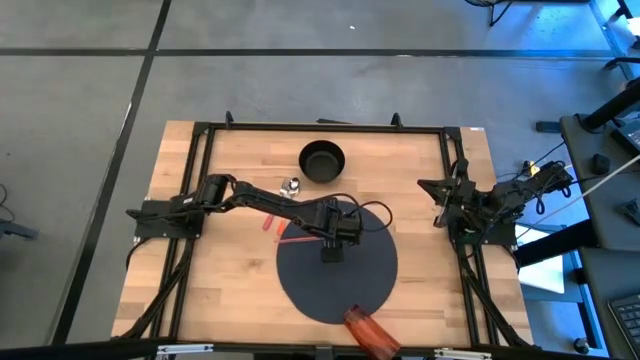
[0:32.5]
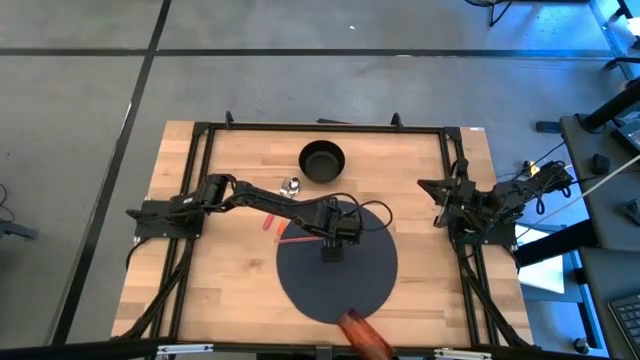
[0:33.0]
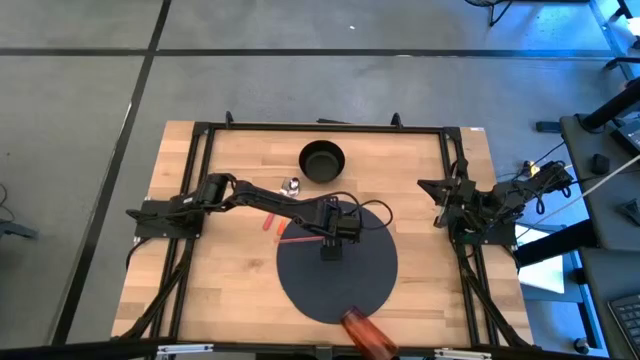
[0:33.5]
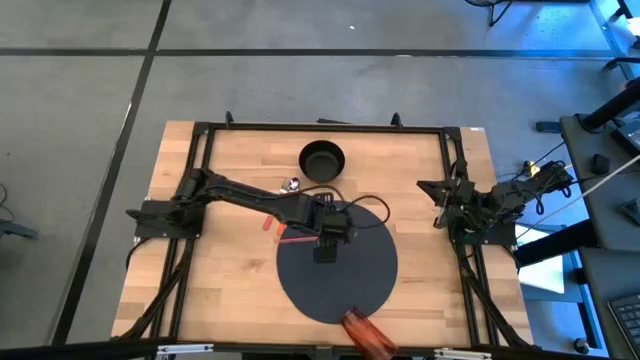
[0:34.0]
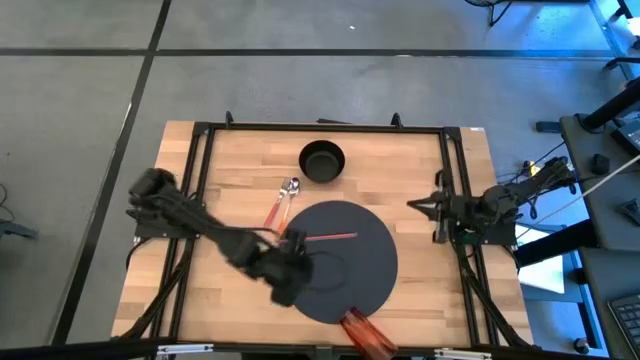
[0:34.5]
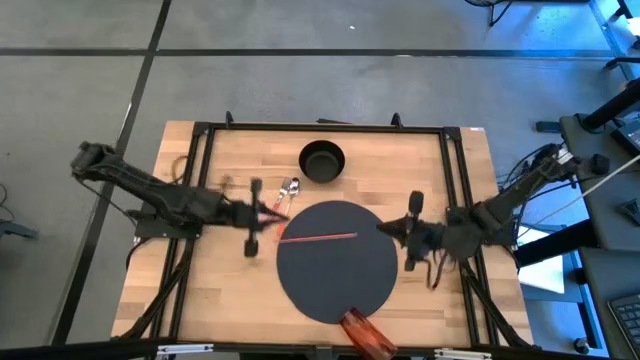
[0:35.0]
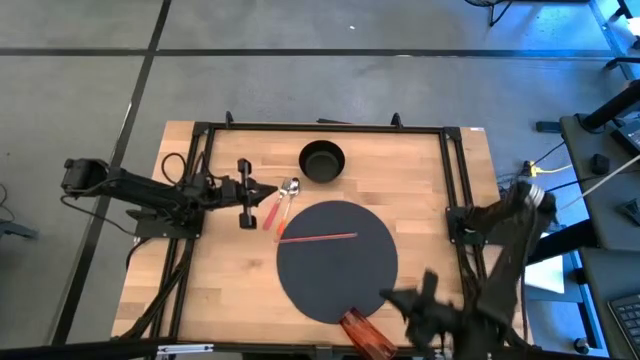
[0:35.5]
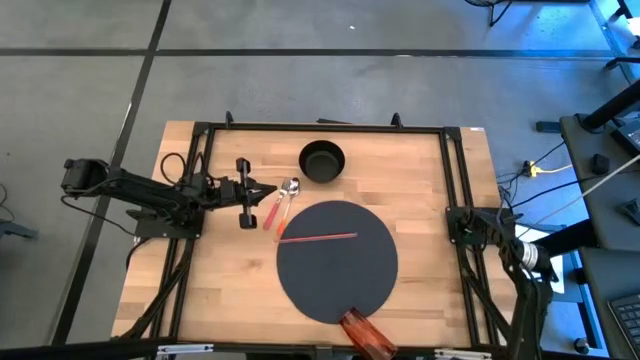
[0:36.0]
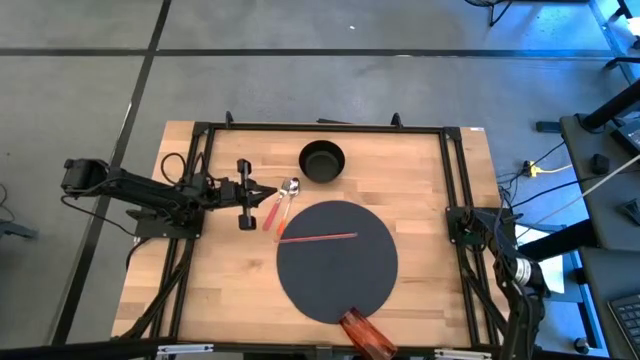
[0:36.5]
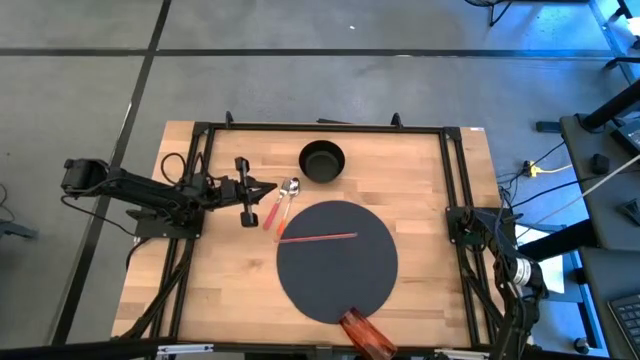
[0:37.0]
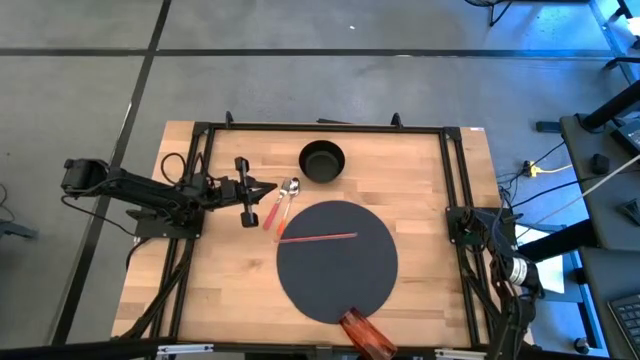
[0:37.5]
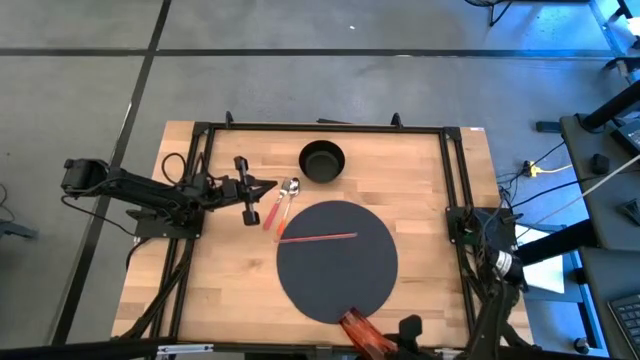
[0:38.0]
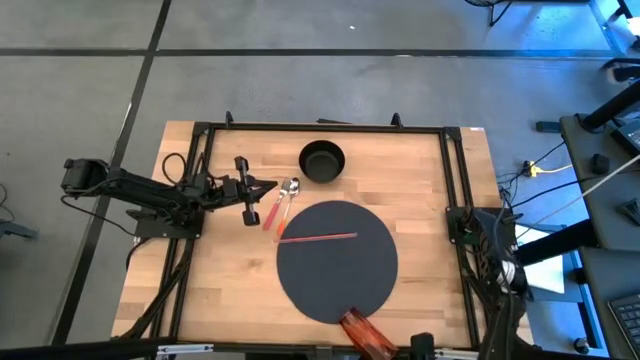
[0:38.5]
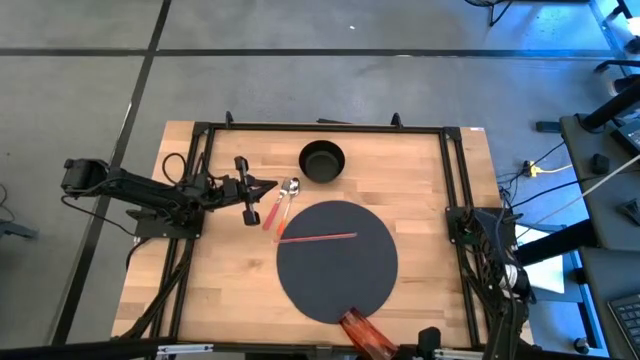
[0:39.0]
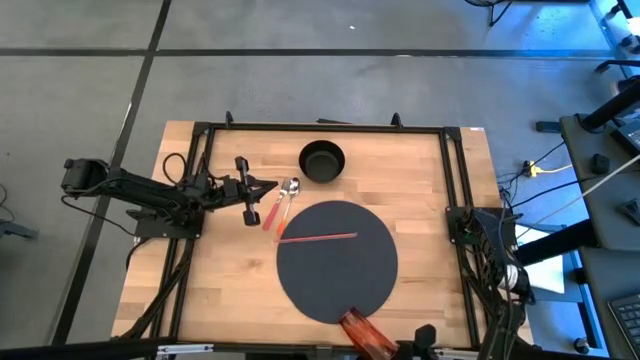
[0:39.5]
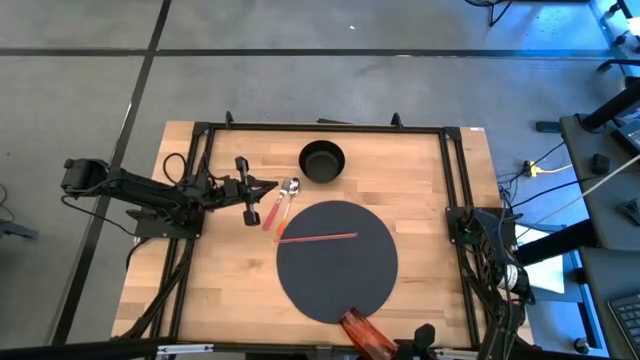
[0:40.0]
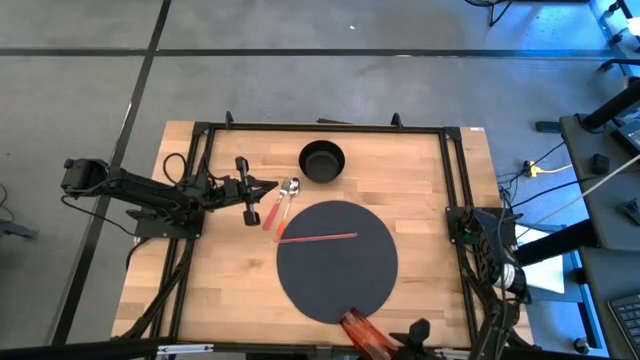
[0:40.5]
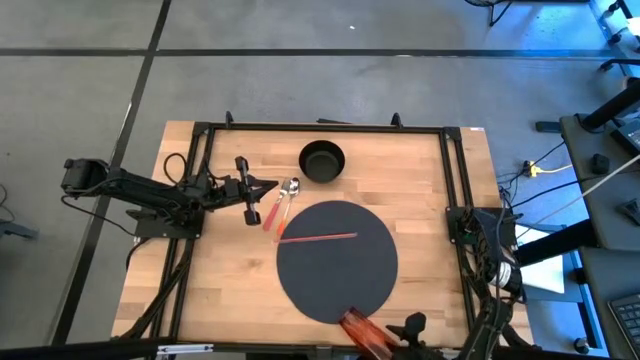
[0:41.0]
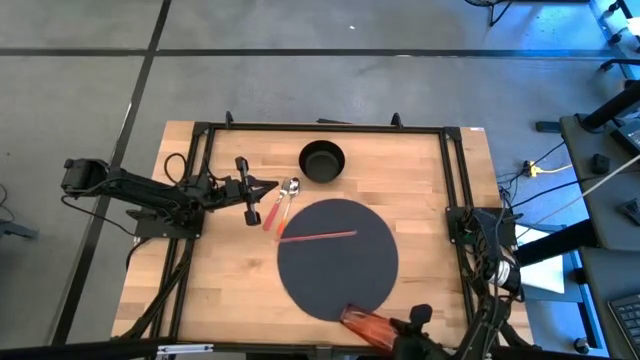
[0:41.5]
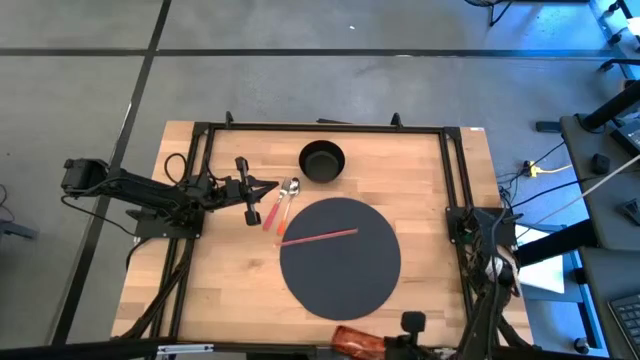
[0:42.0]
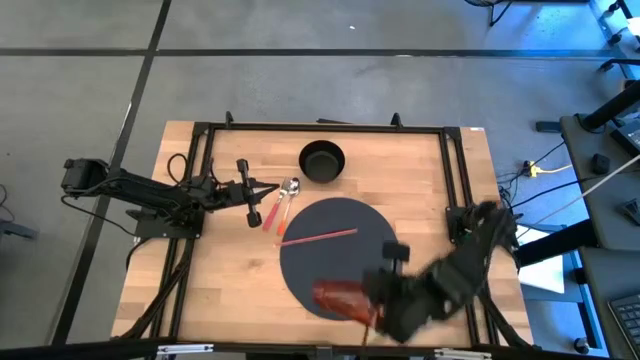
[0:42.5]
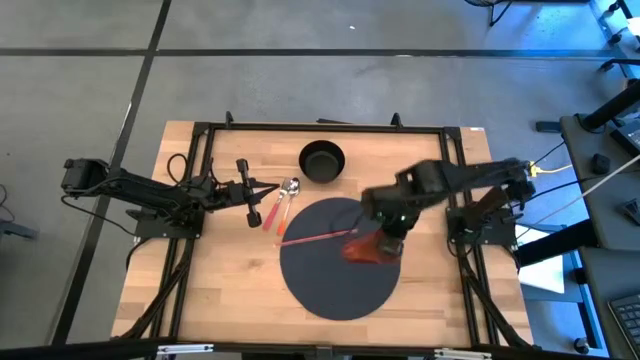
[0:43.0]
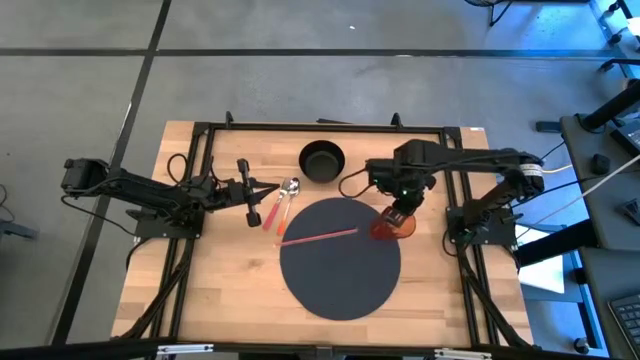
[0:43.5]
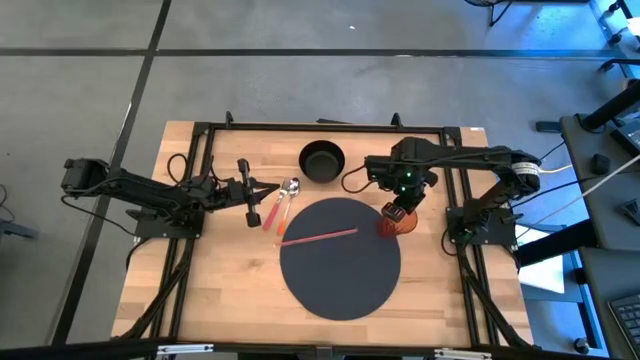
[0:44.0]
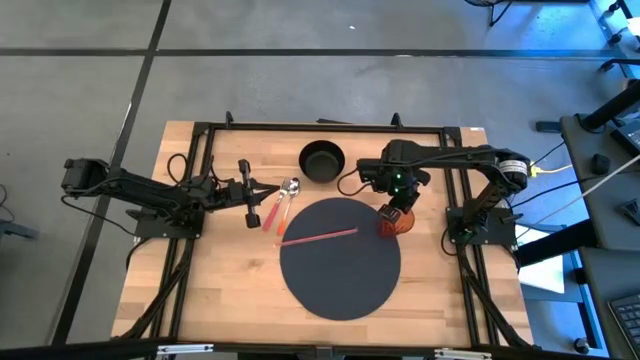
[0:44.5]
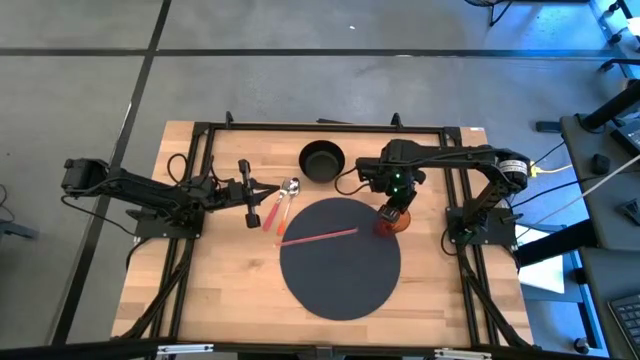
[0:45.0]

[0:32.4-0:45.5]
Task: Pick & Place Utensil
Adjust the brown glass on the gray mat

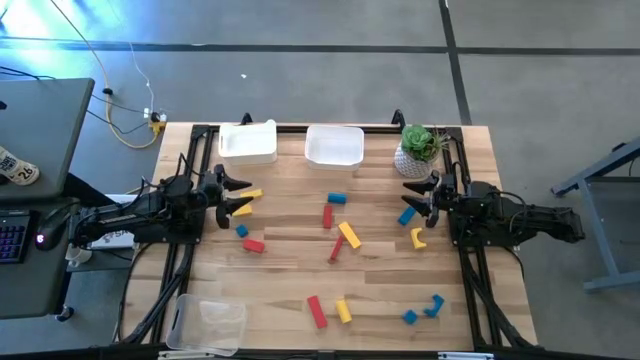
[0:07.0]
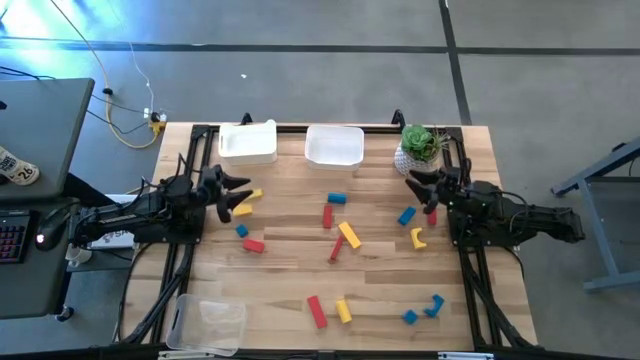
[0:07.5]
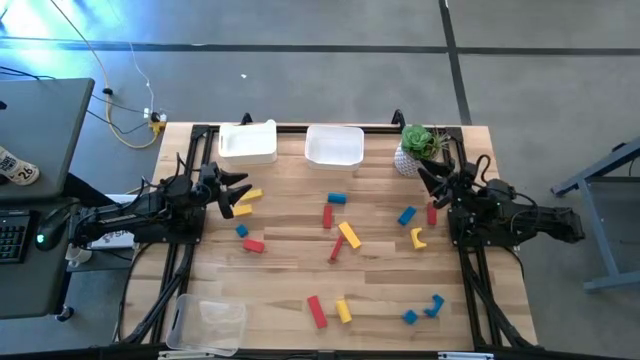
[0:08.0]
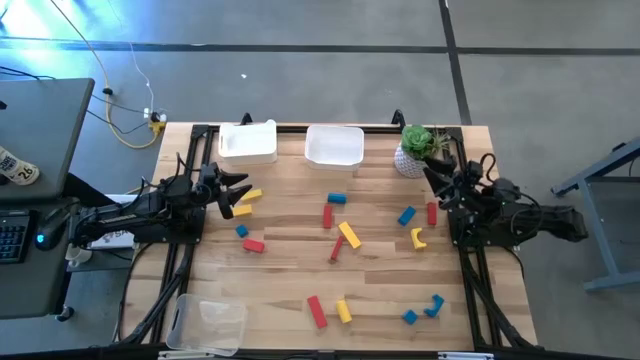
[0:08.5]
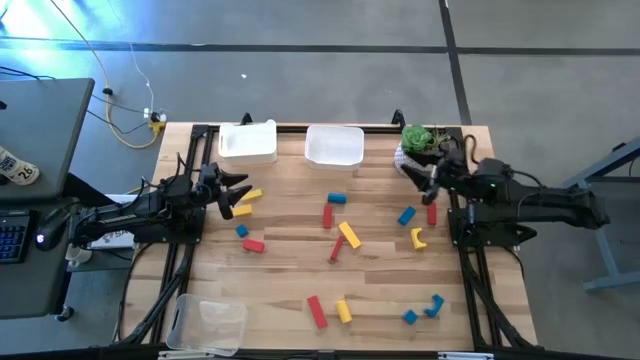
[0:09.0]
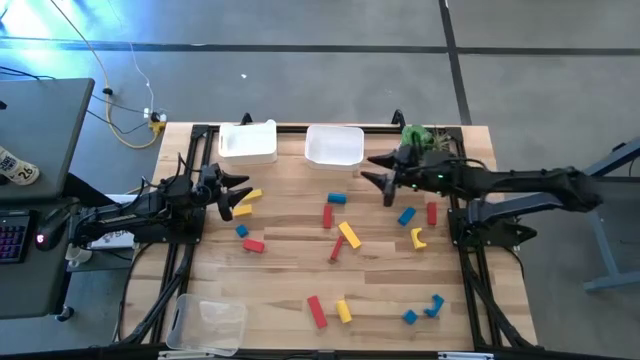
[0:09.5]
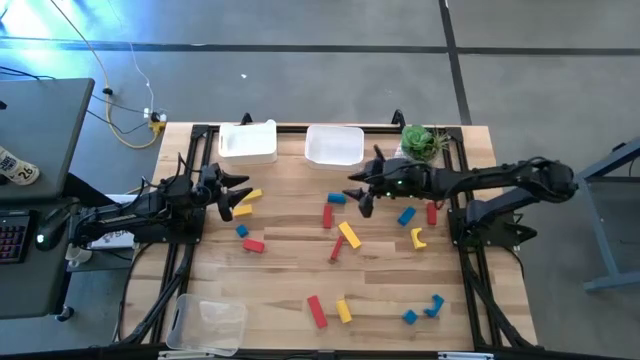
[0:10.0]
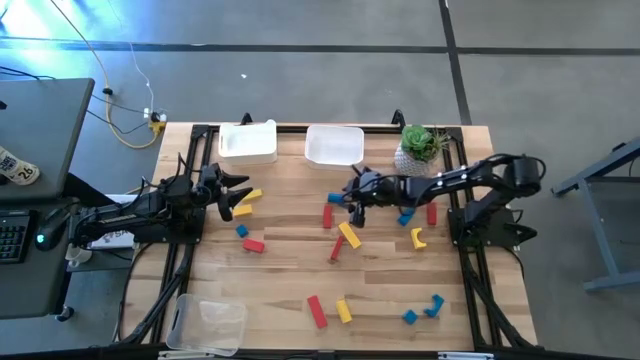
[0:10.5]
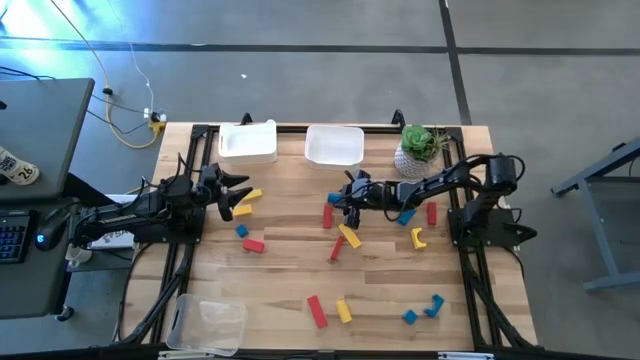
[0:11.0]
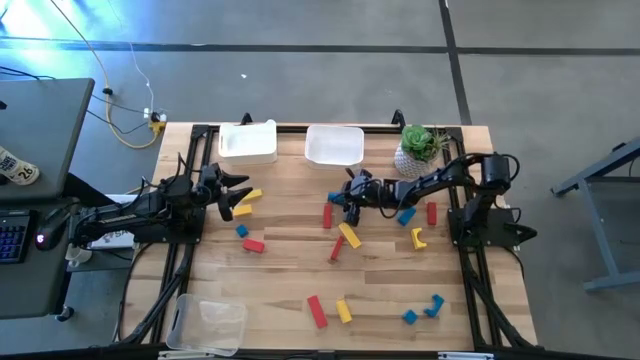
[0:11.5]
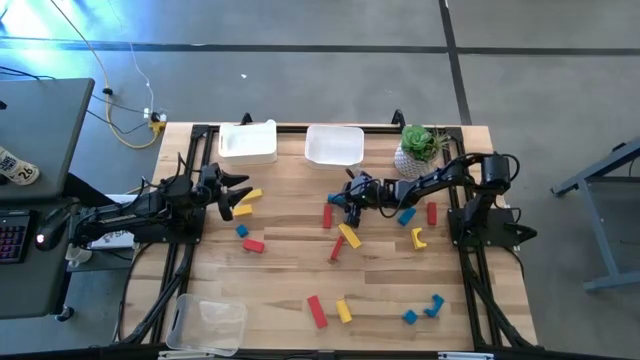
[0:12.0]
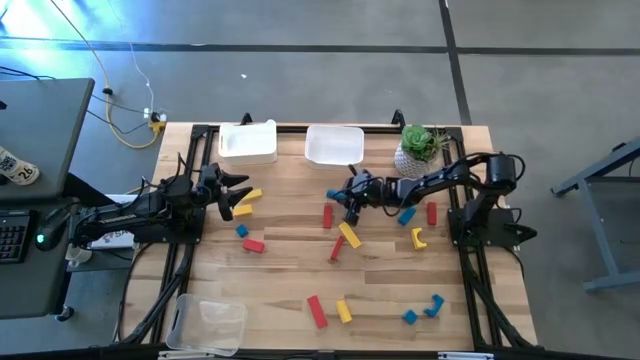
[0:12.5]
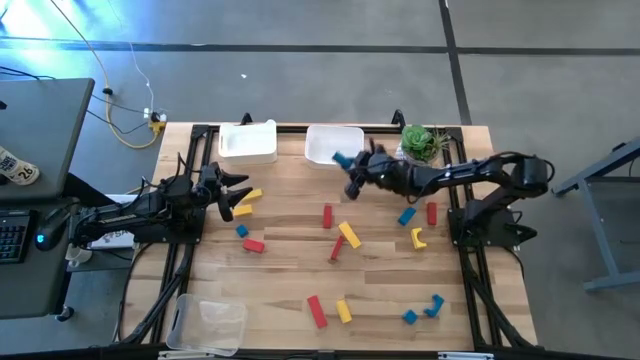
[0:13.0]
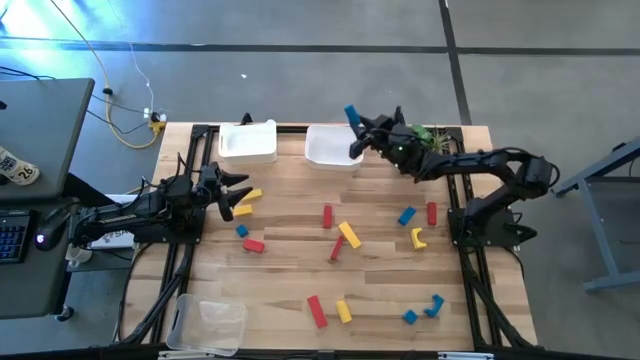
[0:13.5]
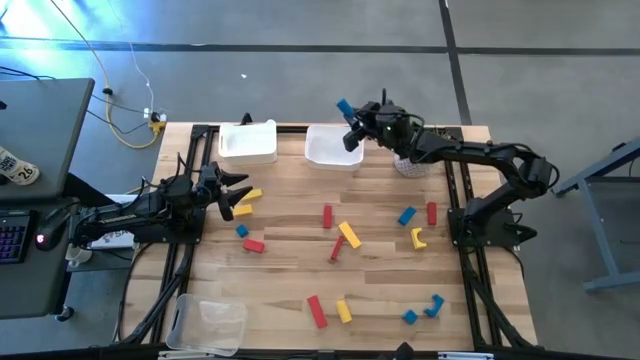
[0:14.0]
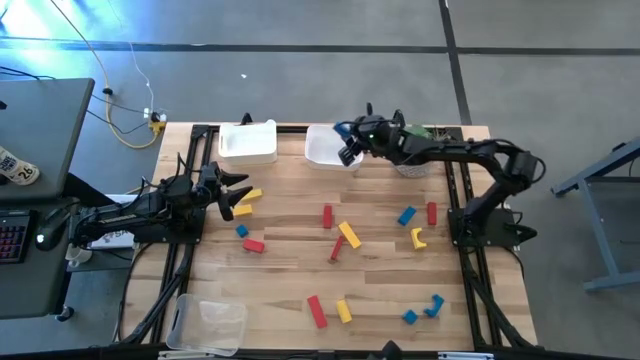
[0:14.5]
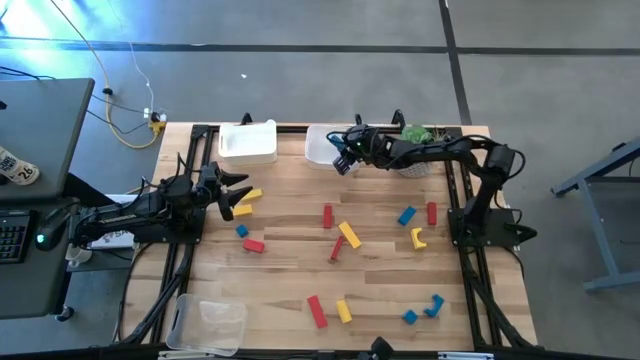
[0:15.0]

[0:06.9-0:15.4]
Task: Sort & place blocks by color
Put the blue block into the right white bin
